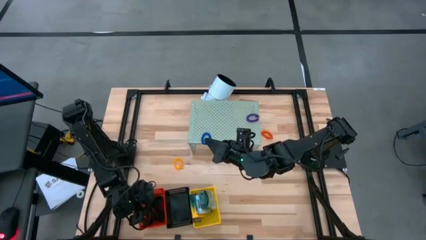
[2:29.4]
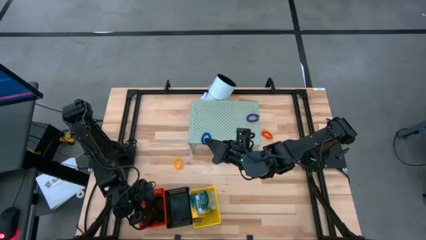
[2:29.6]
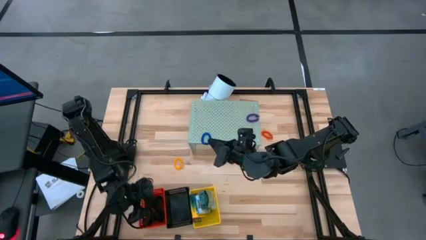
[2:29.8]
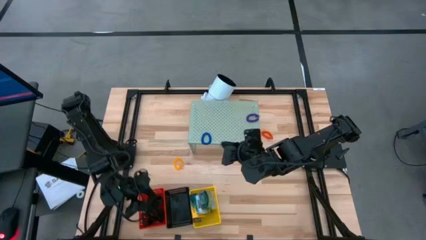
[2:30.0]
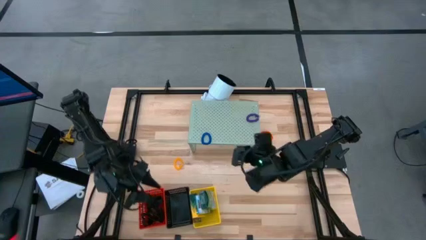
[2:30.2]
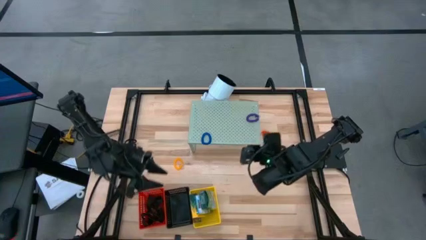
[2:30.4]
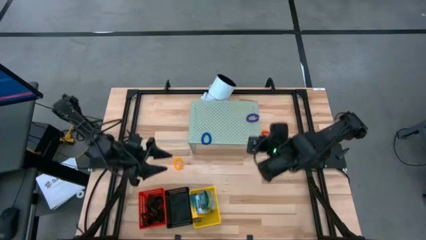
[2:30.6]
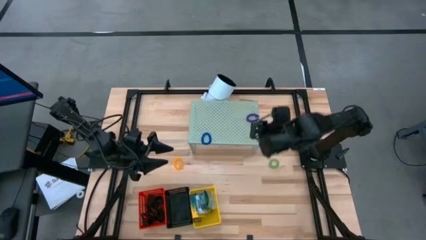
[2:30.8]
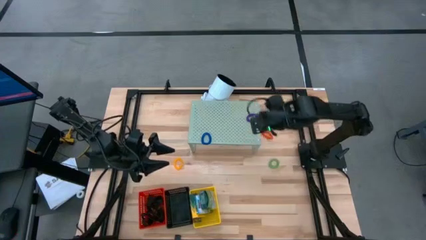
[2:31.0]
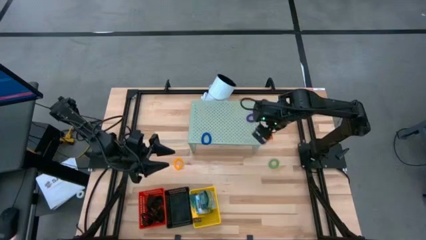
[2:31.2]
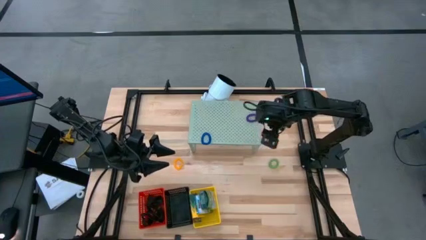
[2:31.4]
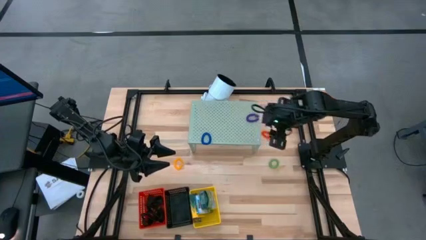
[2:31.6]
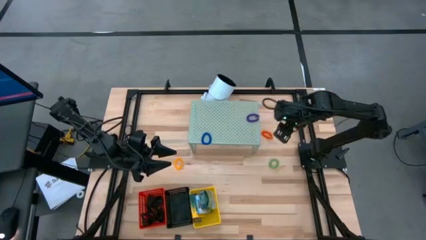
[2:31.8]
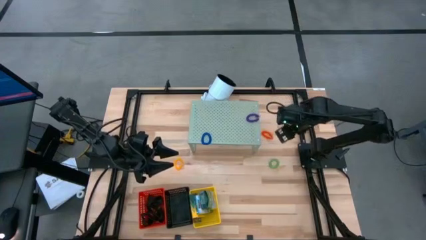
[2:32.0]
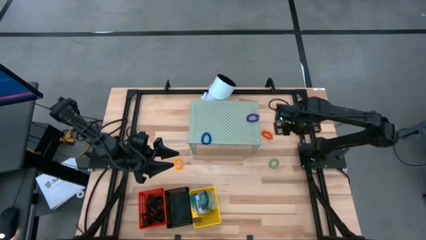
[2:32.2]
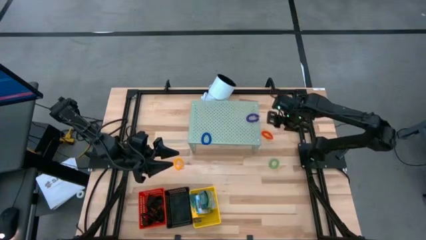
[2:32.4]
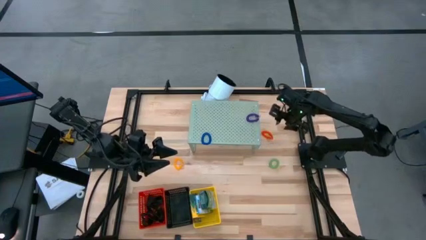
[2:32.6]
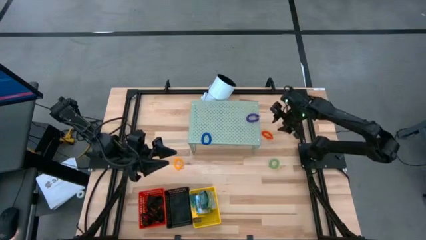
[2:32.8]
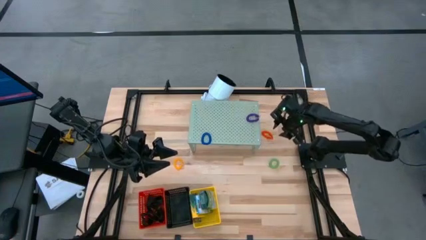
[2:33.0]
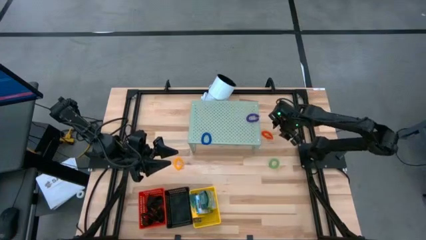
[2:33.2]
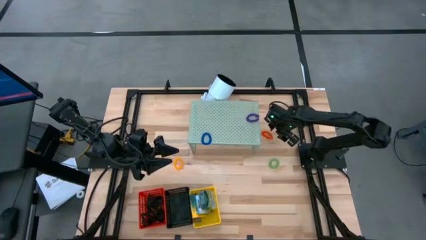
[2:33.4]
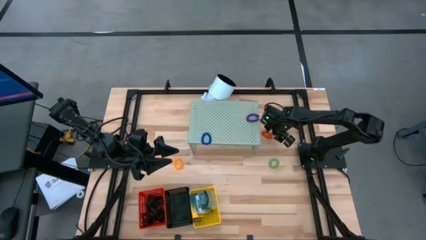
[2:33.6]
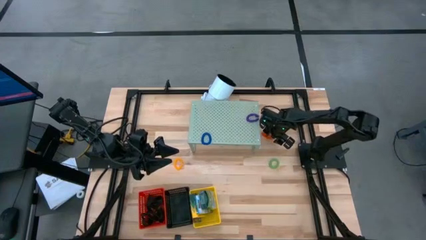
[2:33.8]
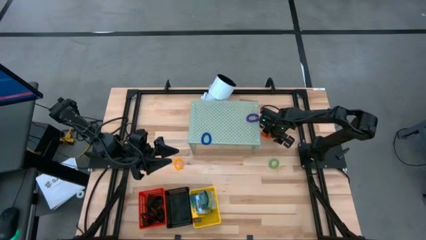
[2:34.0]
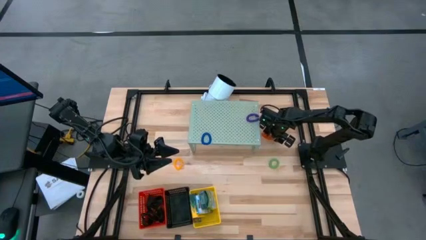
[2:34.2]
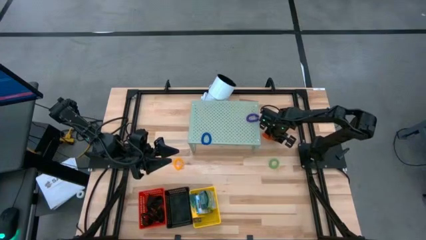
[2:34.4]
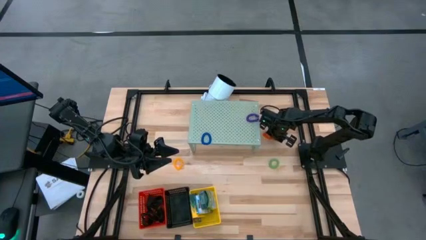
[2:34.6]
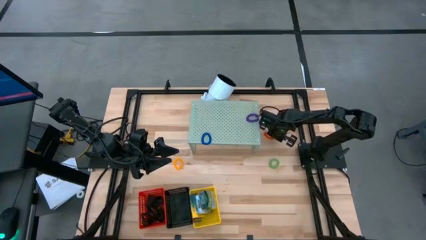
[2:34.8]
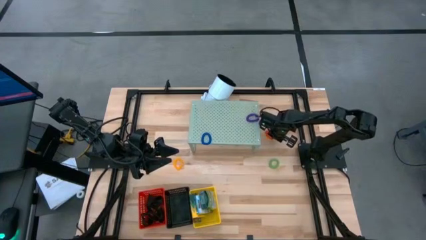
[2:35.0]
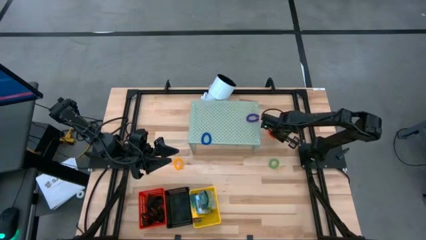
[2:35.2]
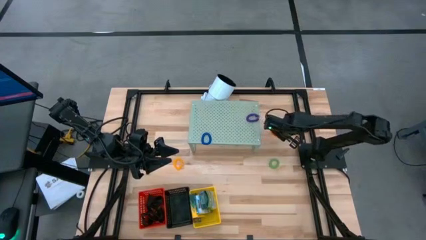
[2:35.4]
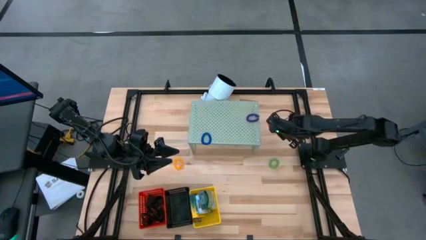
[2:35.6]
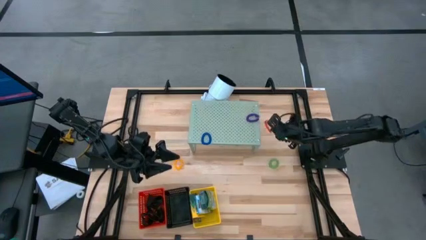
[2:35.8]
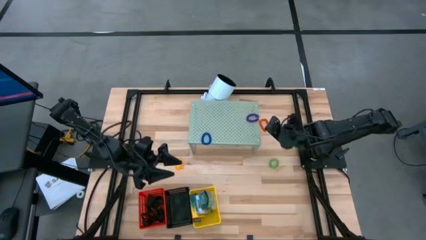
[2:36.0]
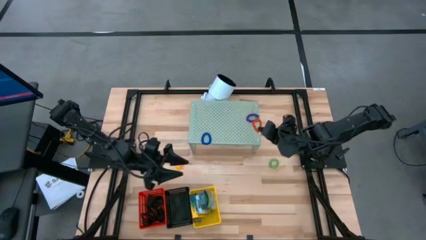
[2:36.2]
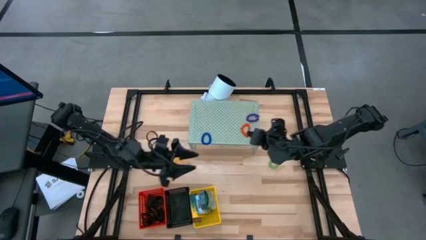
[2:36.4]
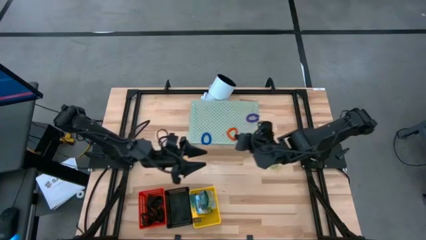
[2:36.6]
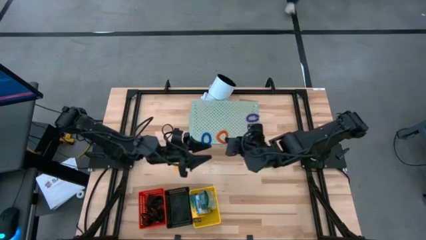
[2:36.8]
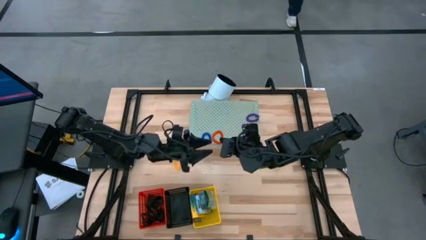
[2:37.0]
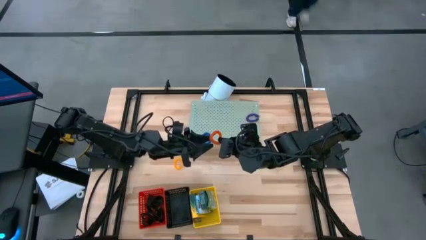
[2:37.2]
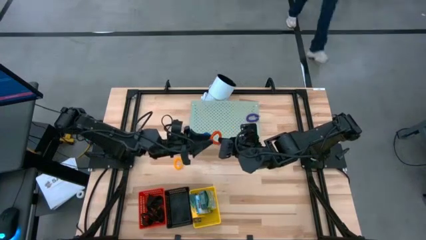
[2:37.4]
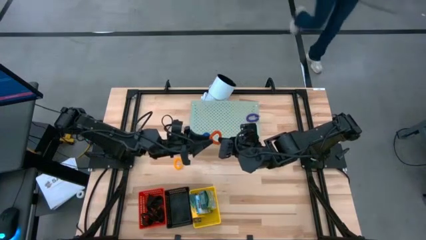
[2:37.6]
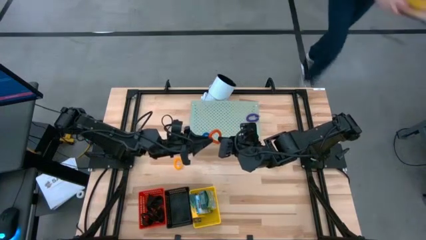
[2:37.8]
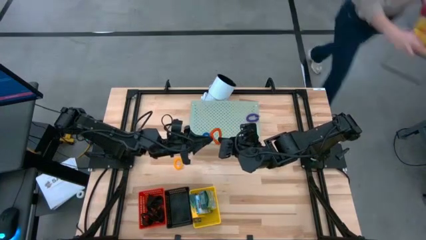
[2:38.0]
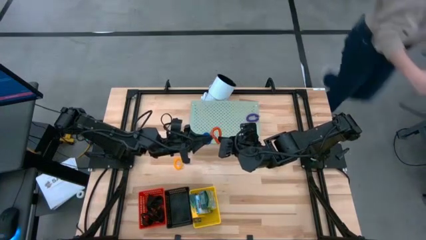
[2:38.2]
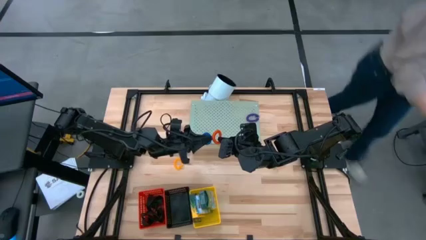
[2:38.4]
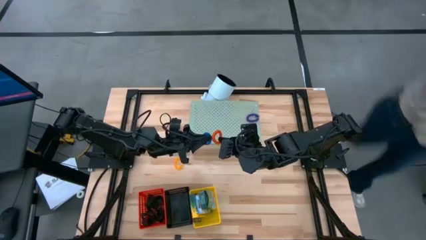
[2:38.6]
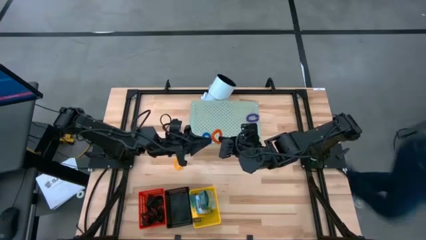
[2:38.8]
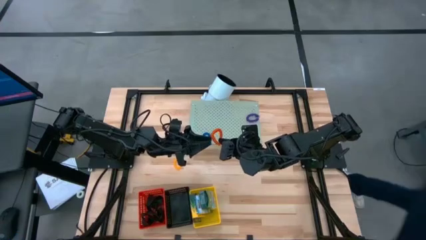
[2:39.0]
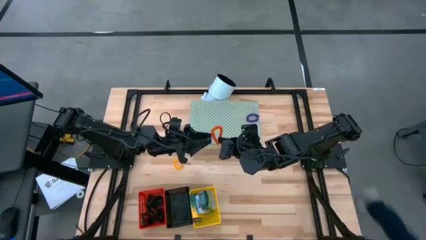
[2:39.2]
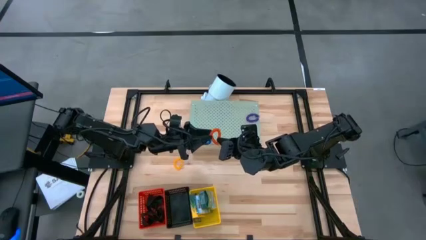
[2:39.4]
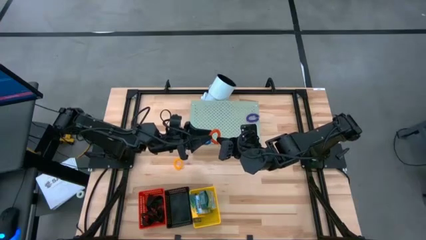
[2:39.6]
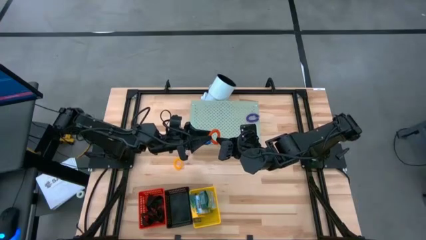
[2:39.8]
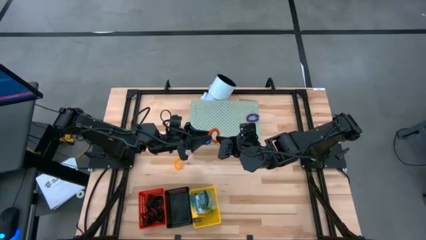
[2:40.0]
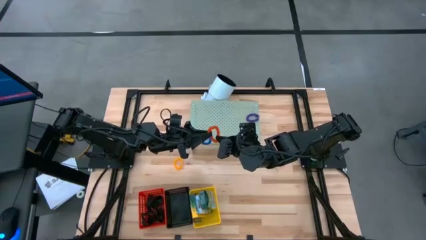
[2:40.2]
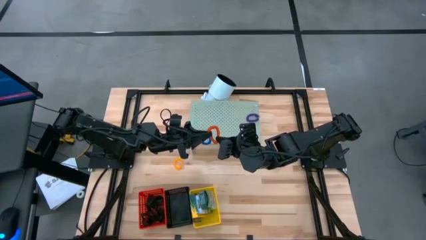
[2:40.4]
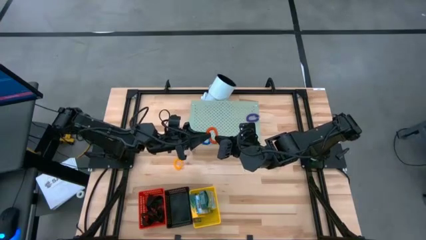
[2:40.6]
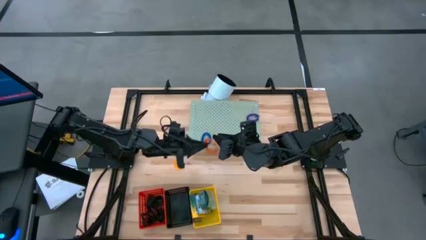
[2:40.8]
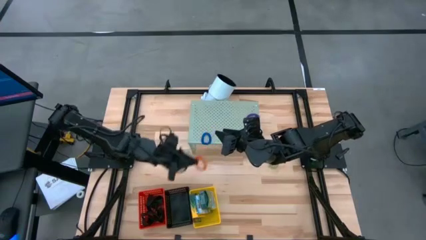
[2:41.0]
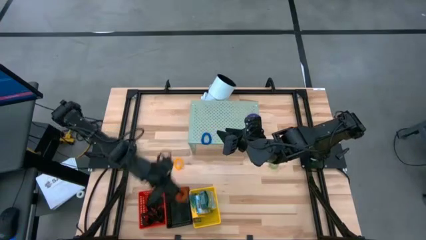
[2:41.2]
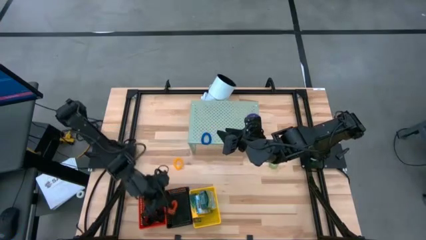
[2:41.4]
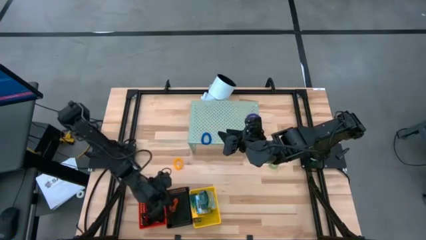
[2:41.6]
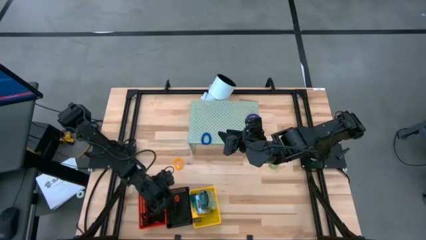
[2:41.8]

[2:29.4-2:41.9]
Task: Pick & Place Office Desk Supplies
Put the orange spring keychain into the black bin

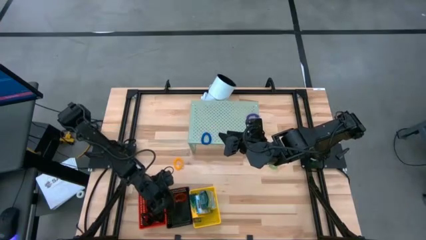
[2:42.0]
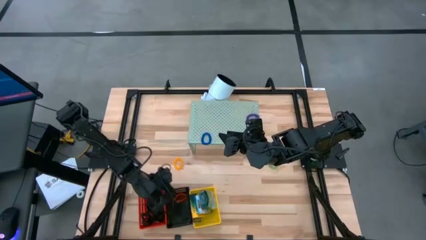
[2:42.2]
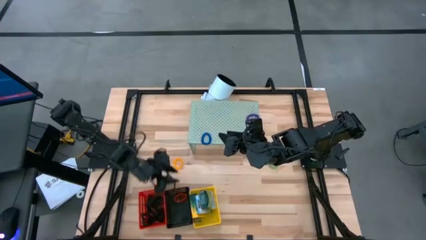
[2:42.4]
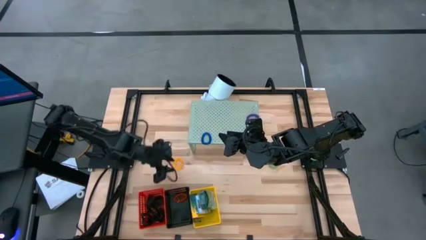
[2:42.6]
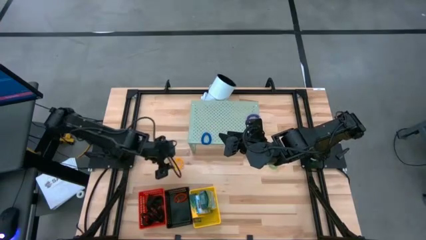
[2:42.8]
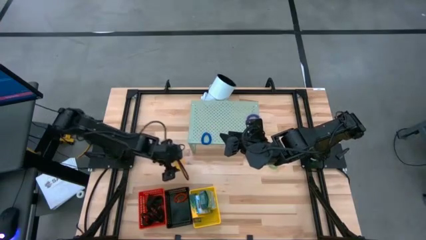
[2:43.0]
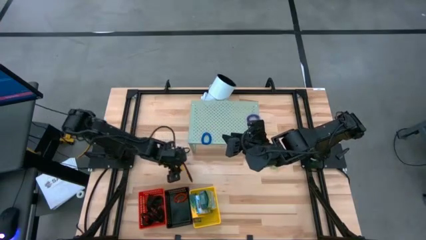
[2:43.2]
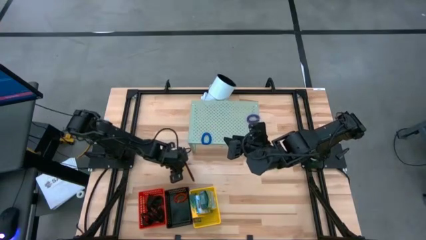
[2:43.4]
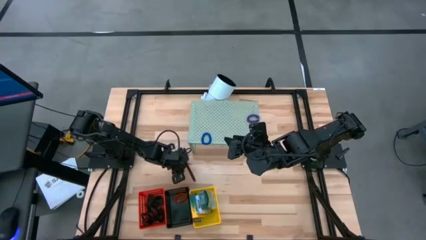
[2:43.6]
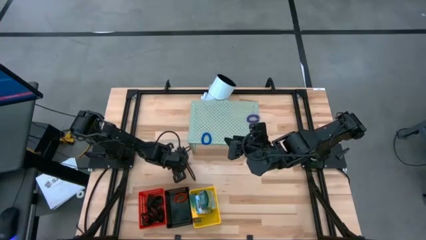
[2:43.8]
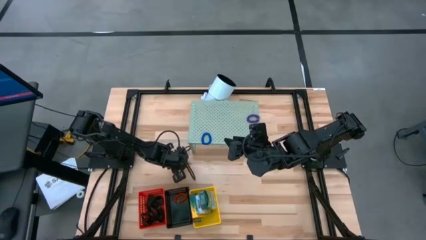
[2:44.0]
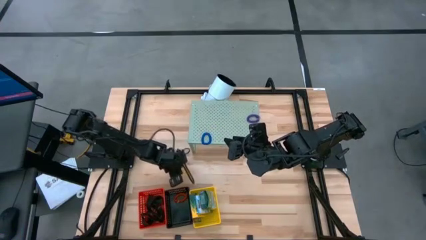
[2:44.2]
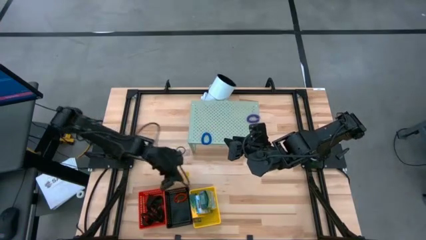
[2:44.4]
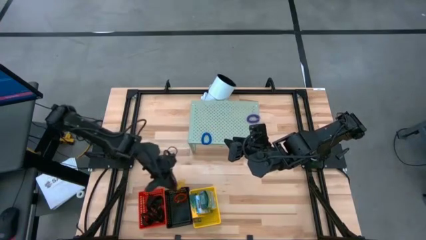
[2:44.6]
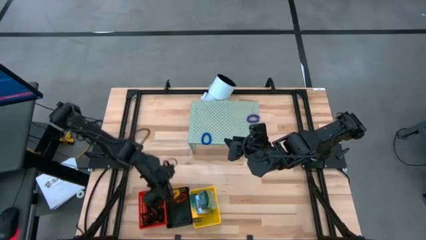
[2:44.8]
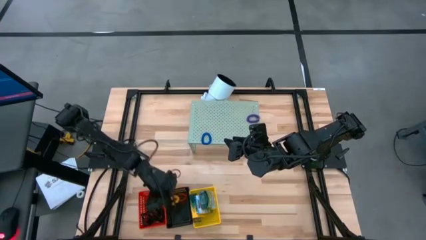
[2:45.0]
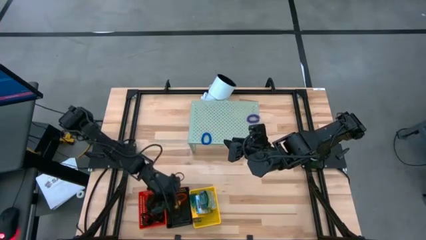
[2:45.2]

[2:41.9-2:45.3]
Put the yellow spring keychain into the black bin
